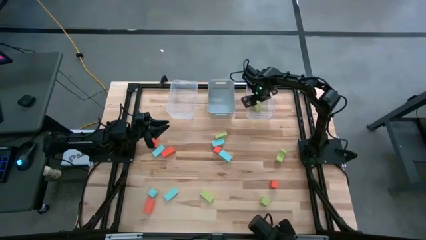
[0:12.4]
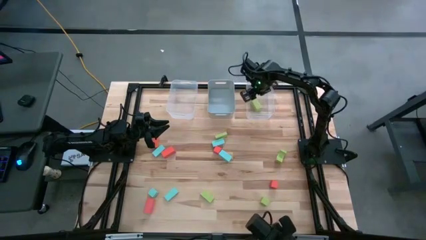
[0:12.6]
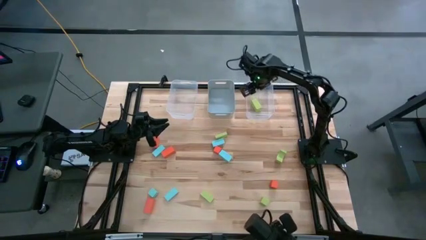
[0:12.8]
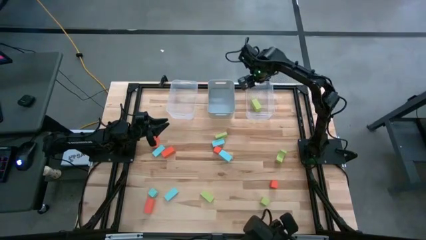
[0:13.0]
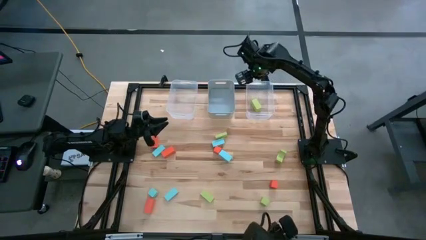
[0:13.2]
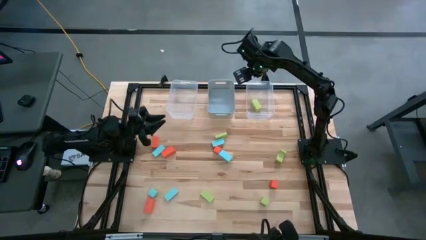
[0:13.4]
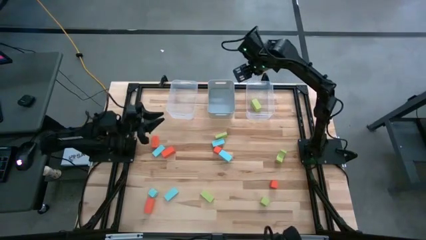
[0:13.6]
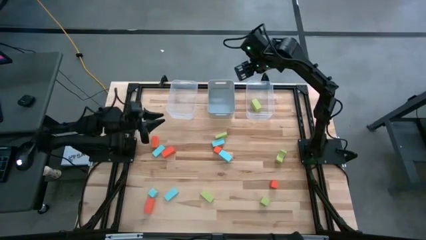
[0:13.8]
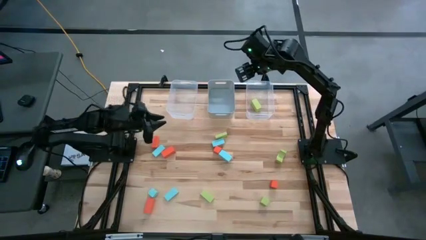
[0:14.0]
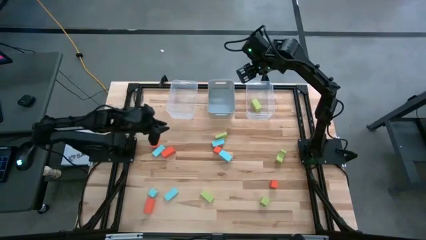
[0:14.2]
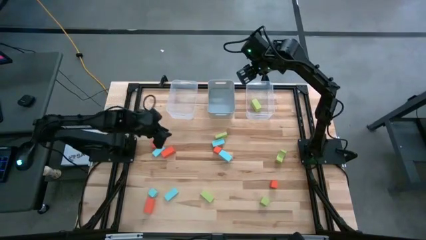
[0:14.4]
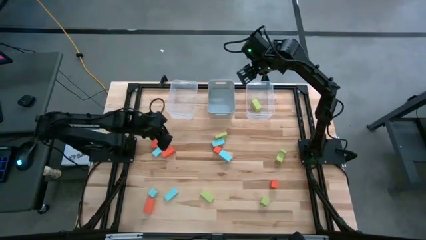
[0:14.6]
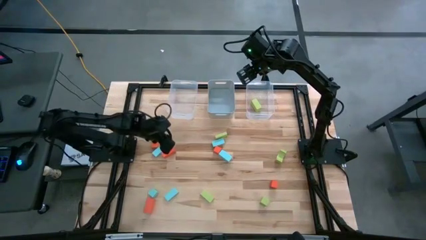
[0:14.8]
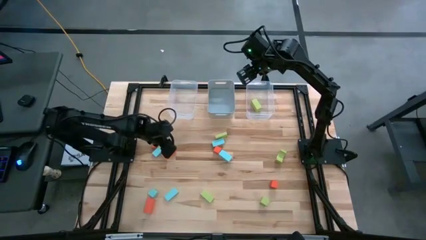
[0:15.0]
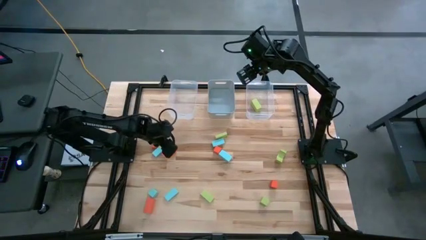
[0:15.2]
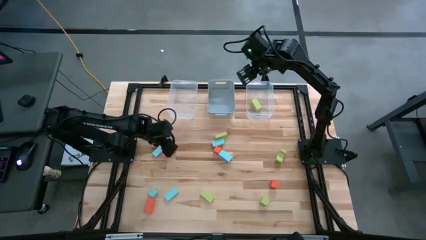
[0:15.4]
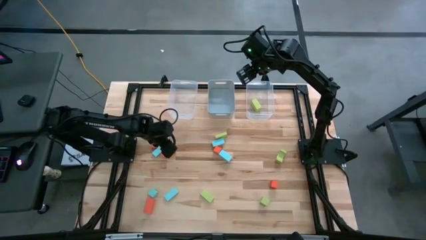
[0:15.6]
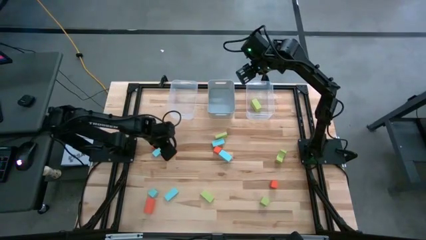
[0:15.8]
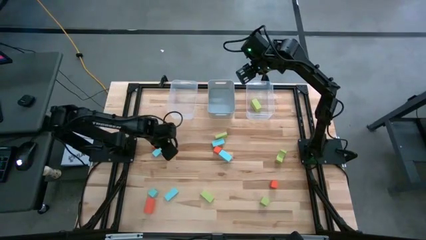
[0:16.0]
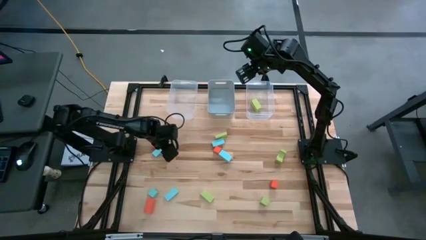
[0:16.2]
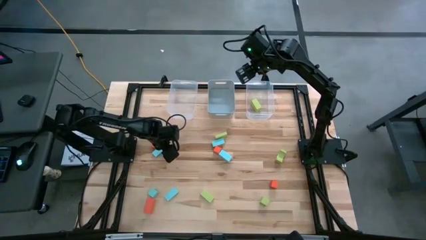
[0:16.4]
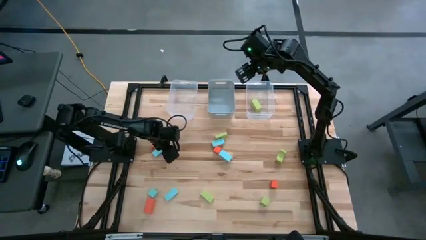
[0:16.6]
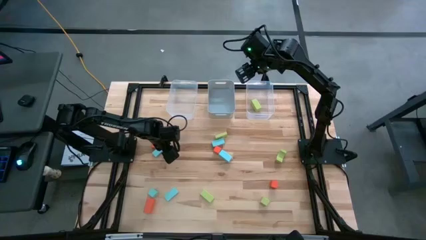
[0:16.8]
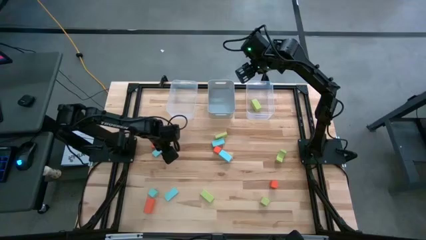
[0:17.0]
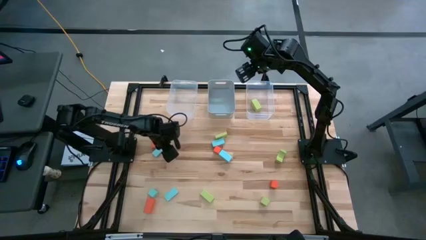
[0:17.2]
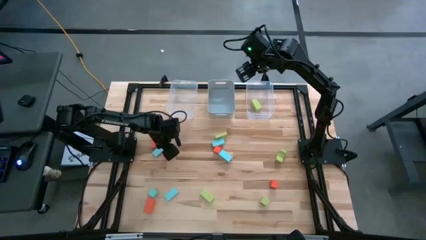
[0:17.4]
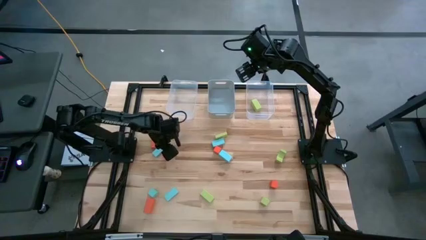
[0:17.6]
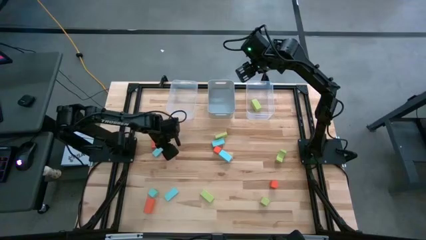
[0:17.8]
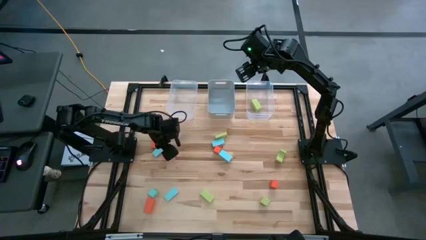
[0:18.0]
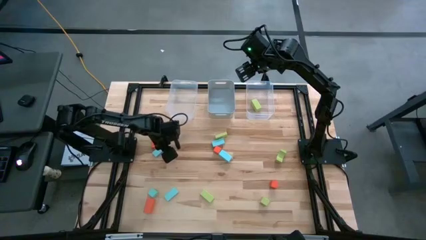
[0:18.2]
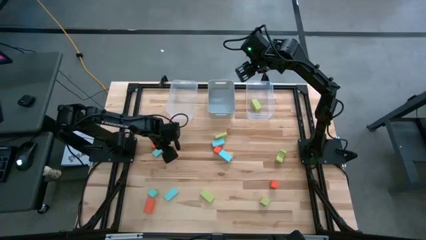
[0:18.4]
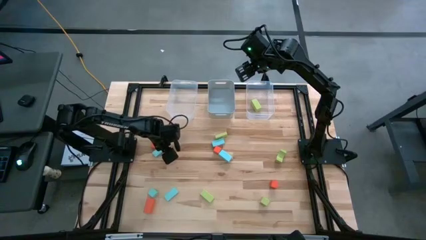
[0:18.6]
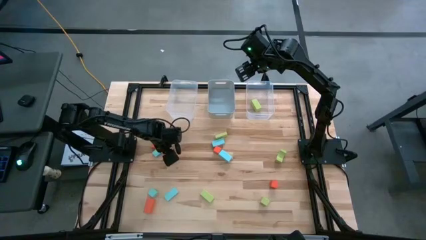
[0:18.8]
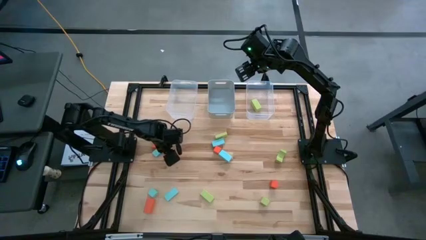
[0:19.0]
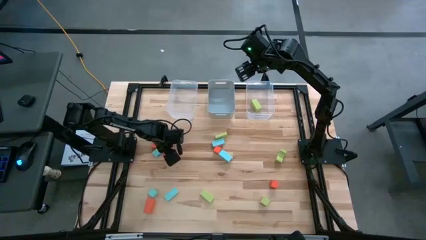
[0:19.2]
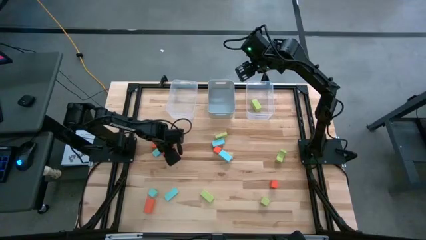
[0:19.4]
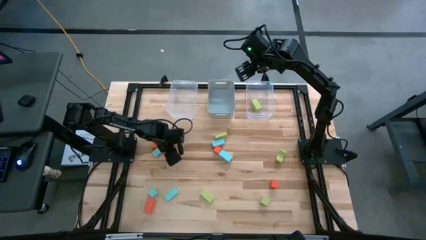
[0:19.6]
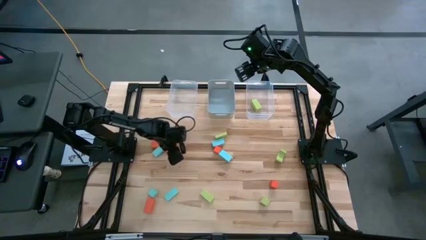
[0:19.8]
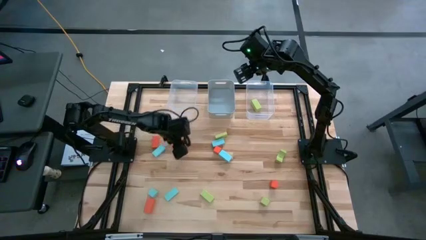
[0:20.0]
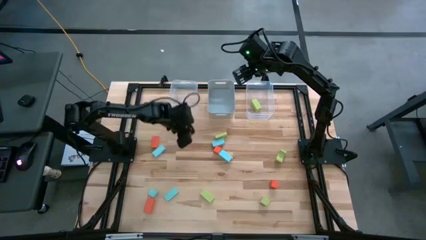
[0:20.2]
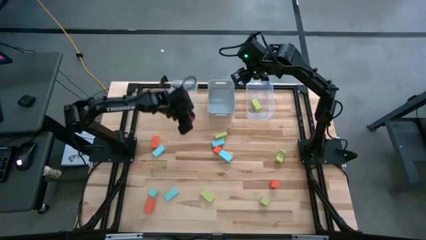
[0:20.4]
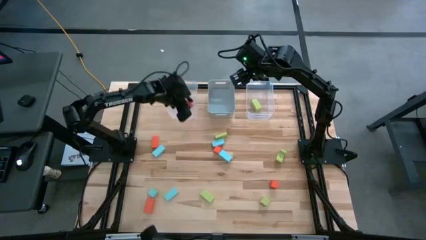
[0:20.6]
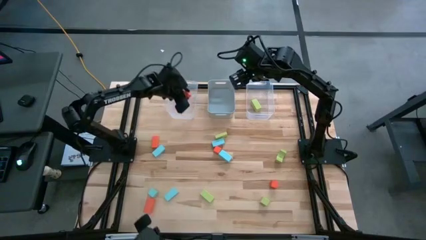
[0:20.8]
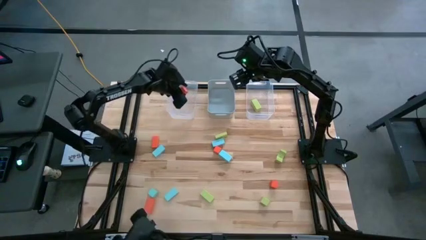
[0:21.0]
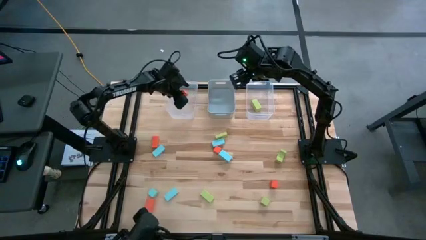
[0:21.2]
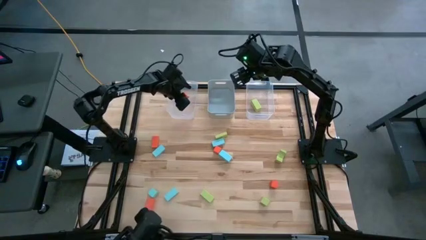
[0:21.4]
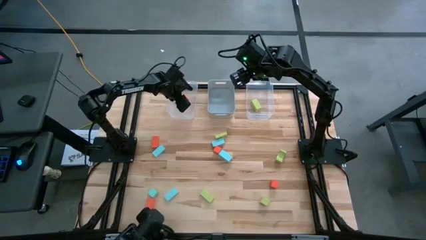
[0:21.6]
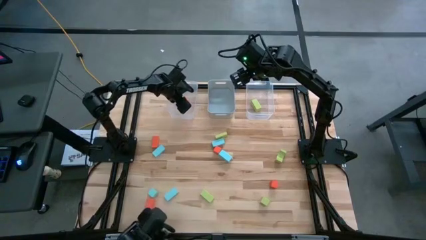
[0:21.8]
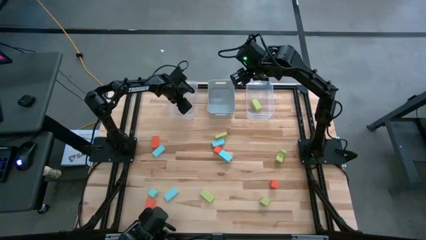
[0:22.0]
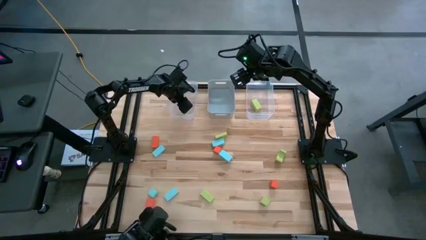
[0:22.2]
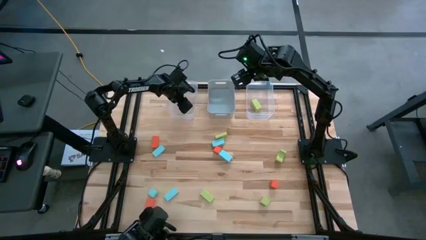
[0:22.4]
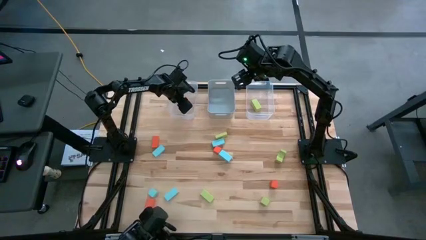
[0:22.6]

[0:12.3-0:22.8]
Task: Sort & place blocks by color
Put the orange block into the left transparent bin

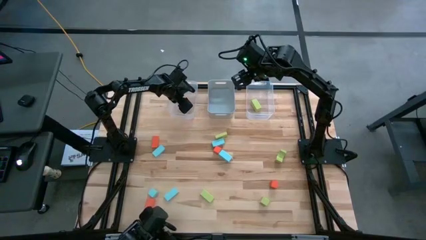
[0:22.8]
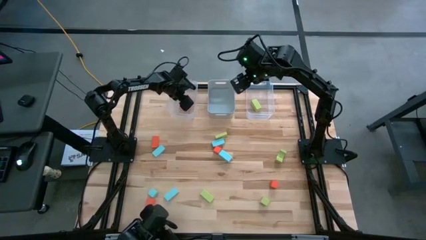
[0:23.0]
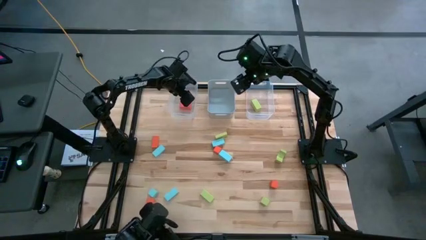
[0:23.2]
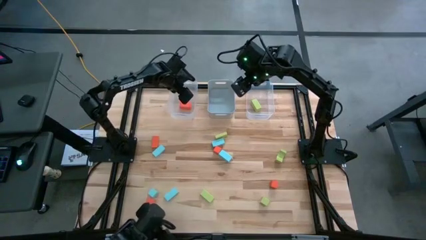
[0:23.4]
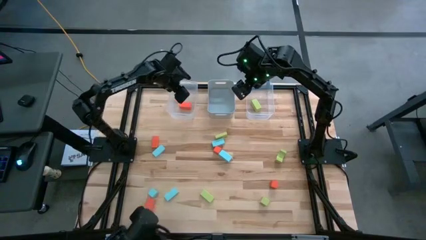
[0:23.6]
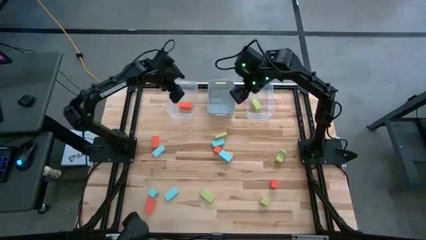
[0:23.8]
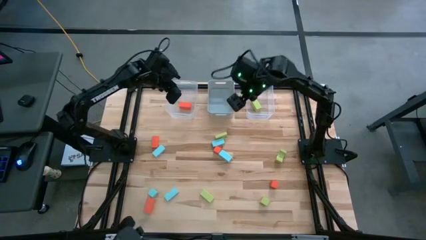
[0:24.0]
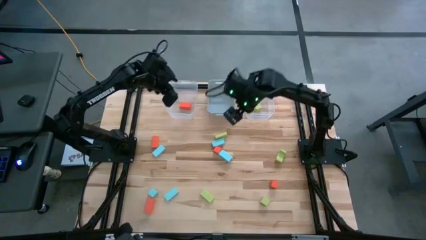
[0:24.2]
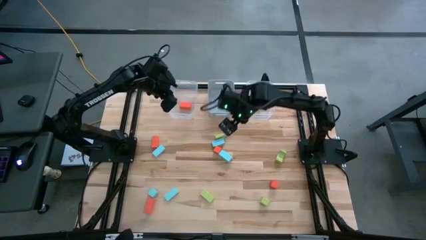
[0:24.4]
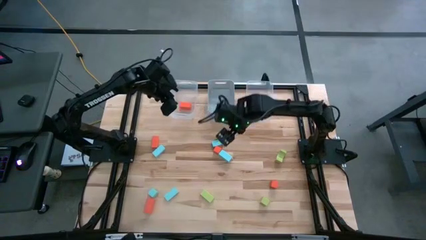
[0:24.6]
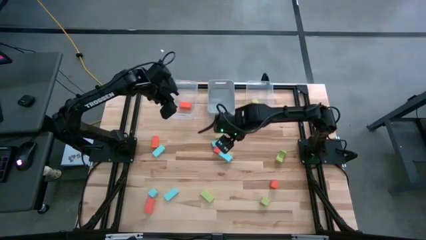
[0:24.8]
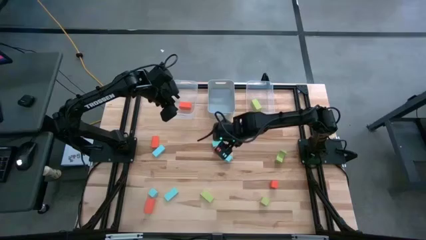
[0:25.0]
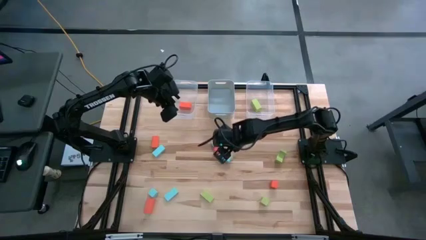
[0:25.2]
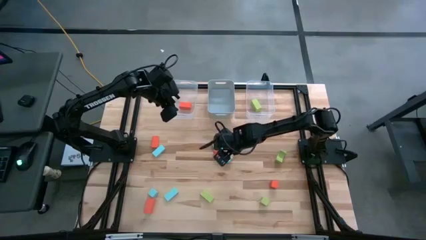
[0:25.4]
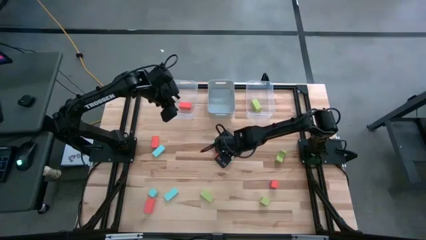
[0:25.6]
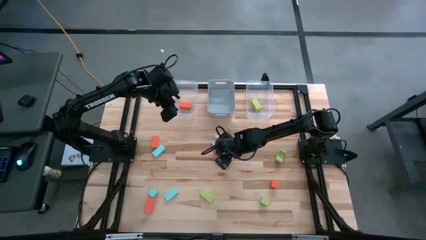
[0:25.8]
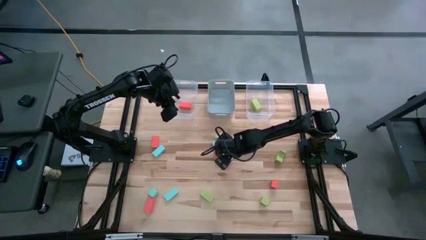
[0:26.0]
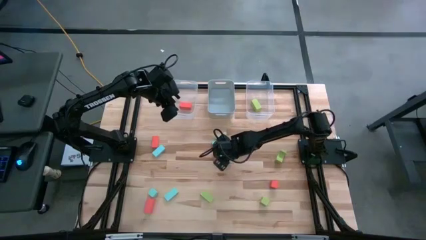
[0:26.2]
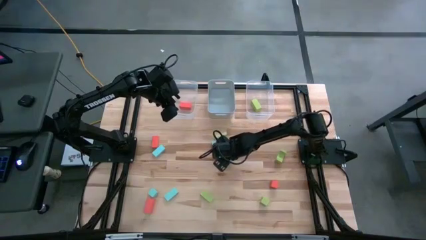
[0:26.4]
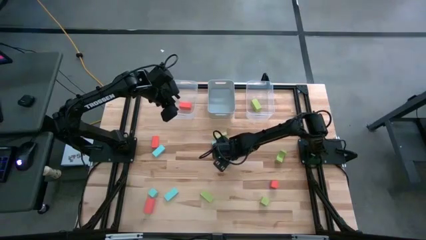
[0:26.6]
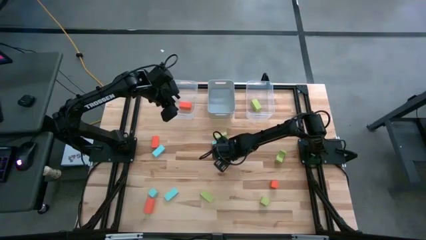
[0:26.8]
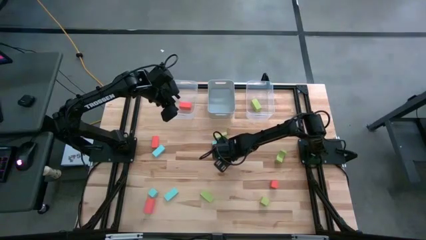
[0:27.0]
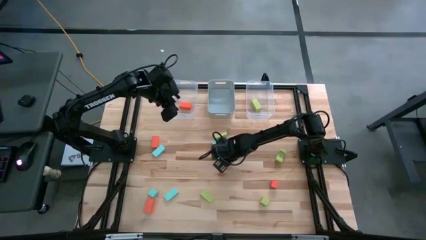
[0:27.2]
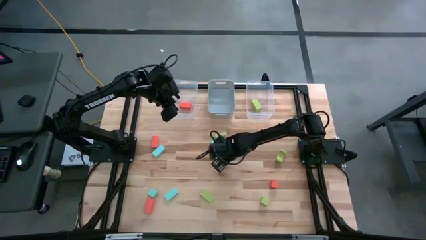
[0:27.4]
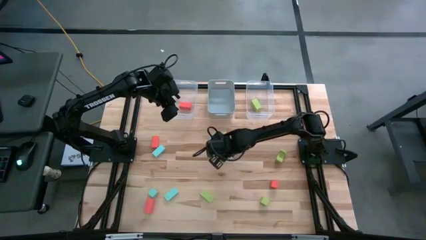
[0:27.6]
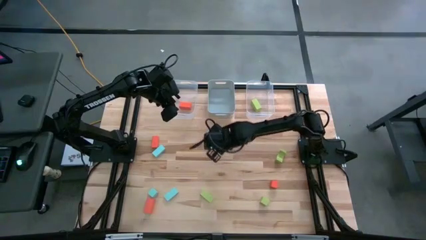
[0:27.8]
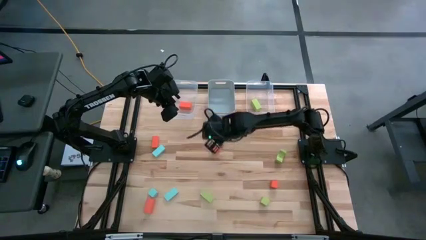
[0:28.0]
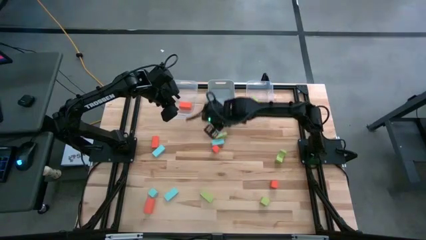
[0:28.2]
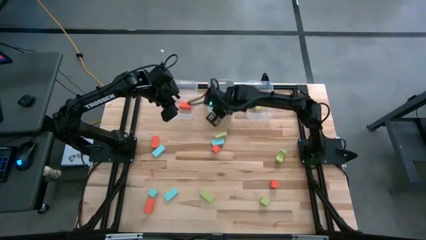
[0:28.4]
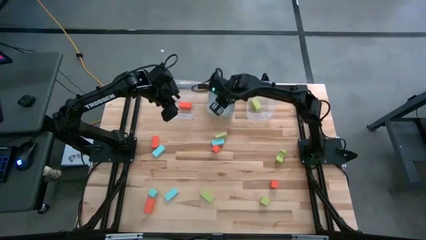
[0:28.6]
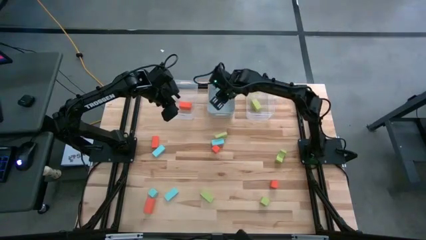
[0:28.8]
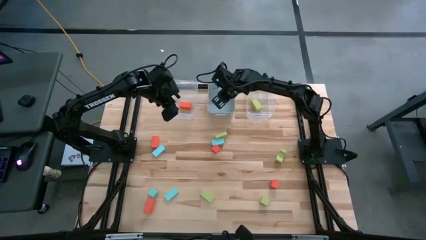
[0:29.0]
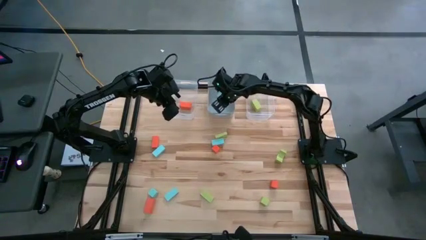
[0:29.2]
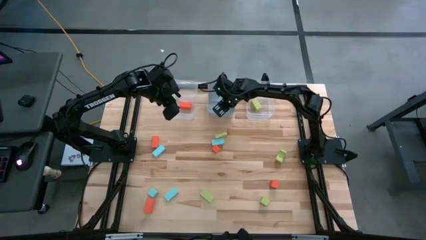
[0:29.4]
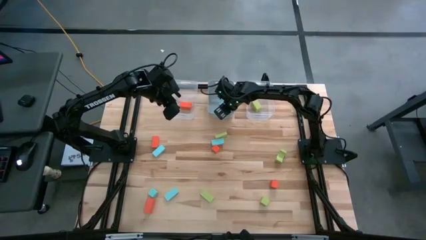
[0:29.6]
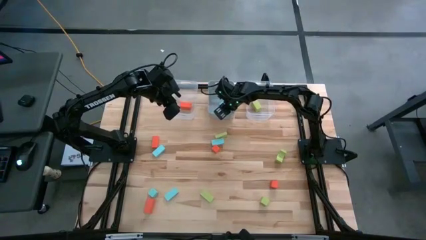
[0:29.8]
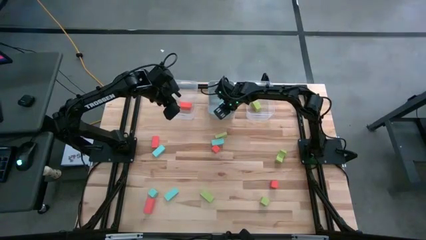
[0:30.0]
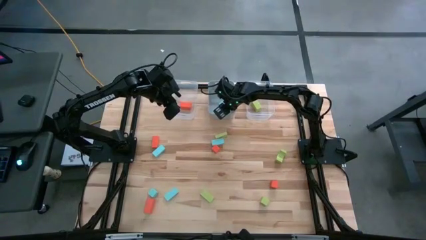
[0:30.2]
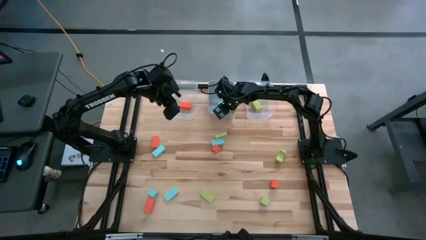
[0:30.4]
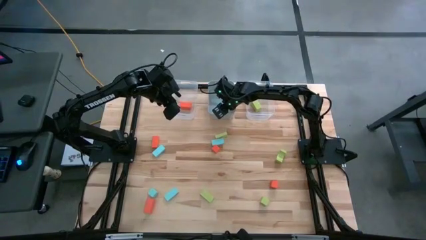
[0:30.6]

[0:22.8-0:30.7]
Put the blue block into the grey bin
